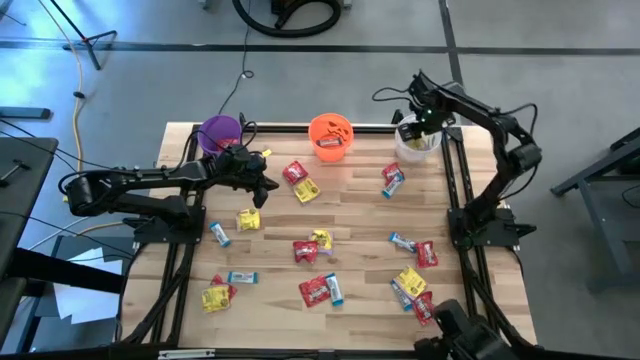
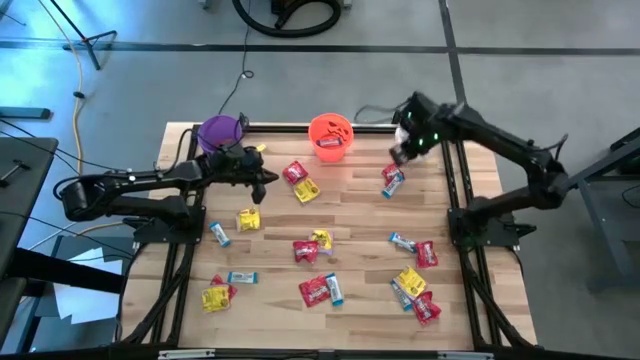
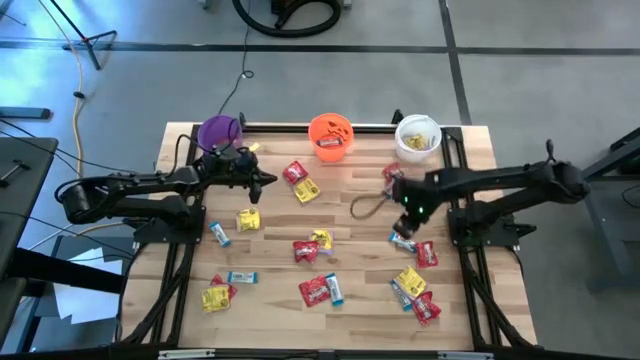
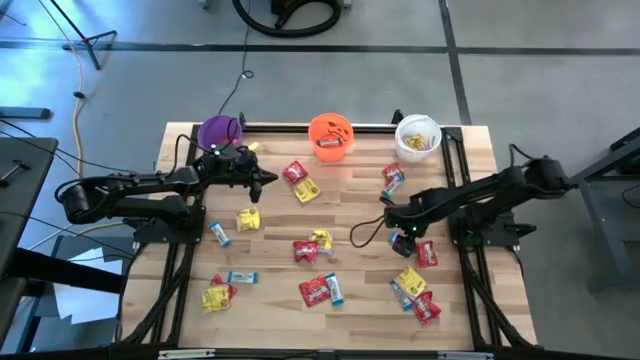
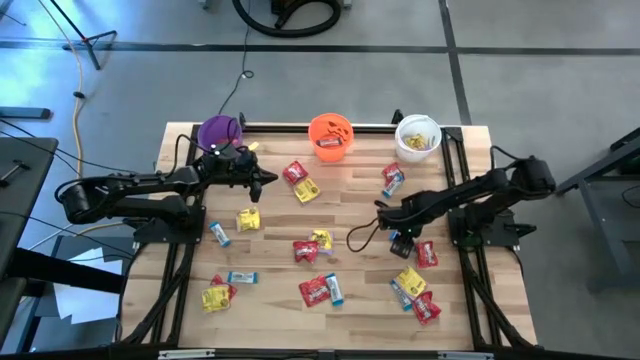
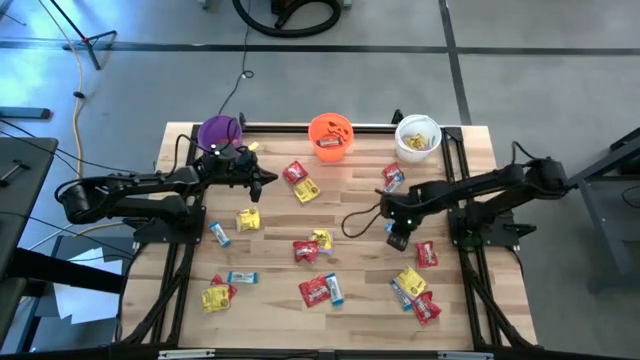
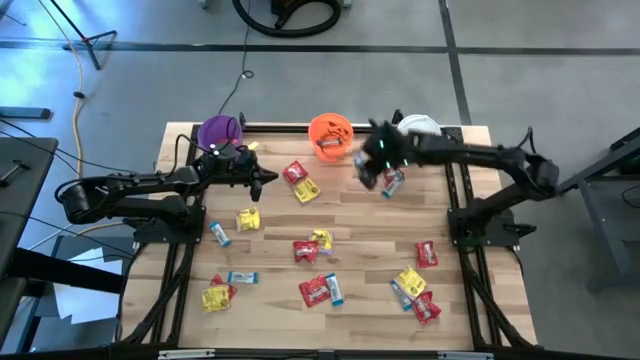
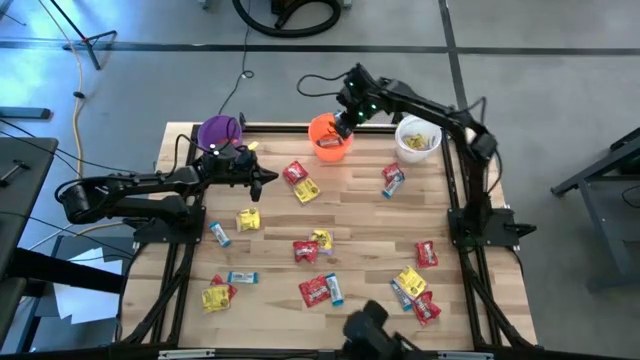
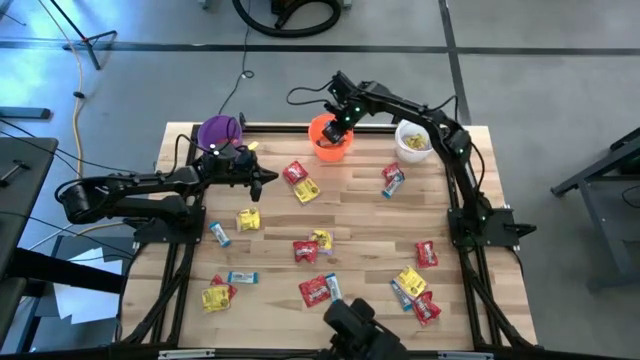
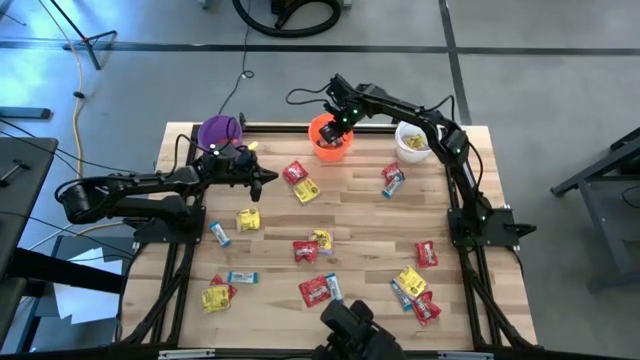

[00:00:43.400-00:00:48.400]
Task: Organize candy in baskets
Put the white chocolate into the orange bucket

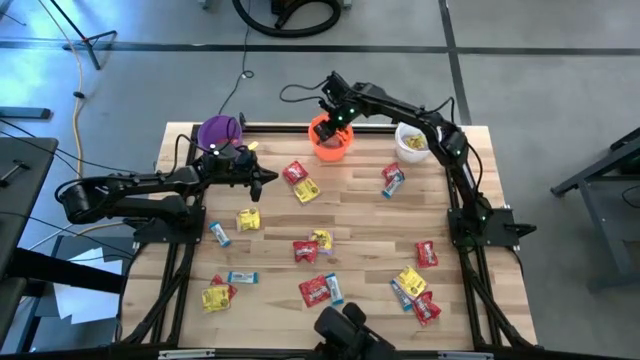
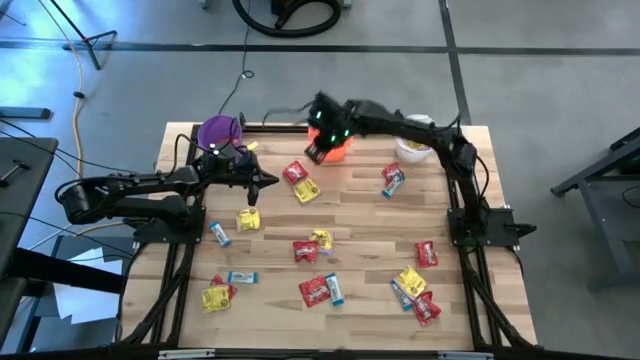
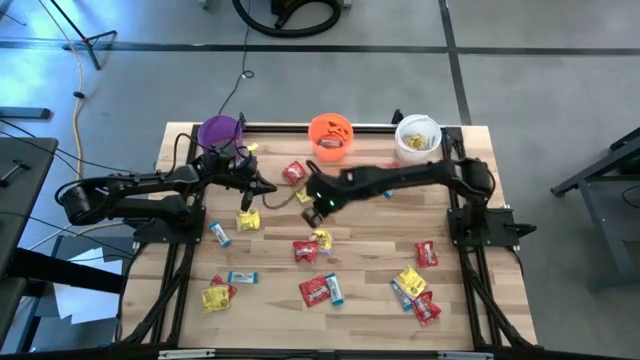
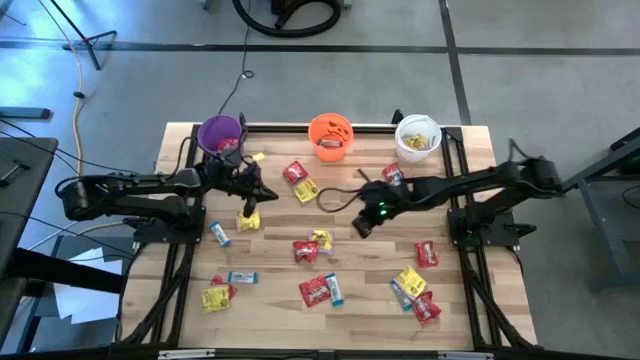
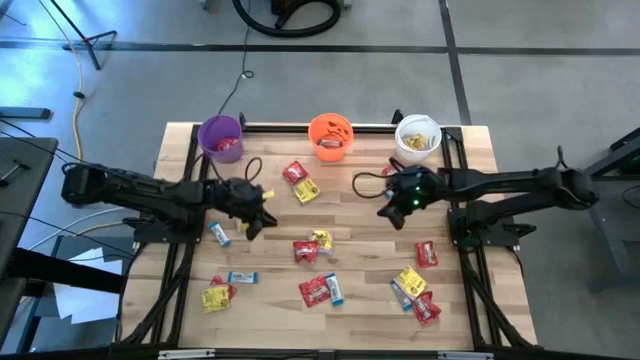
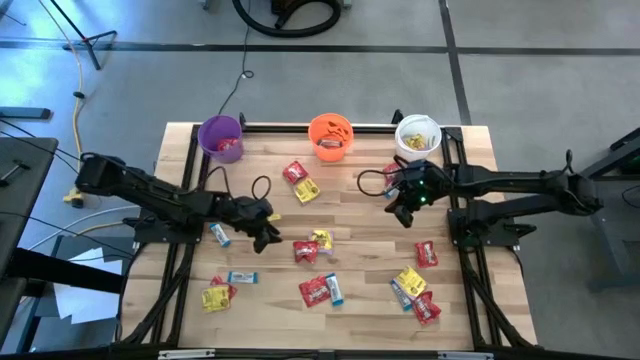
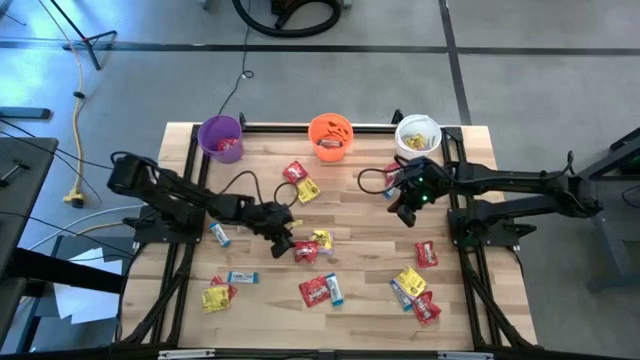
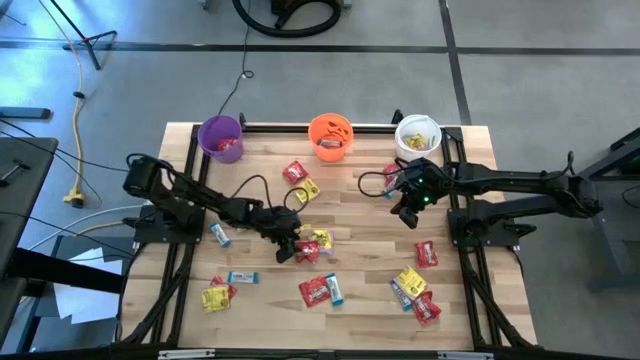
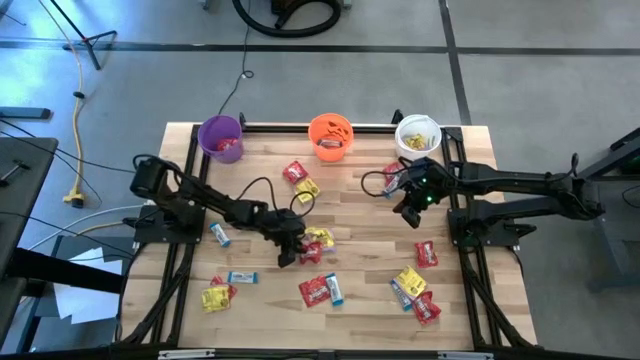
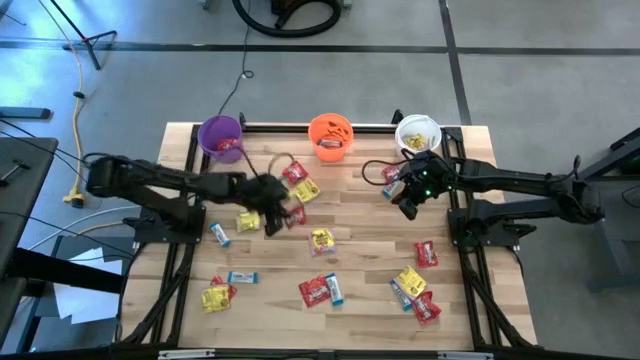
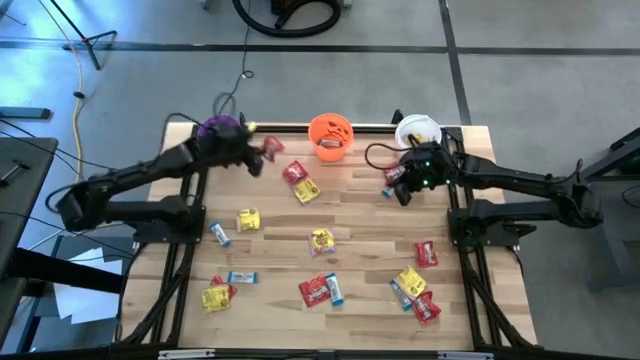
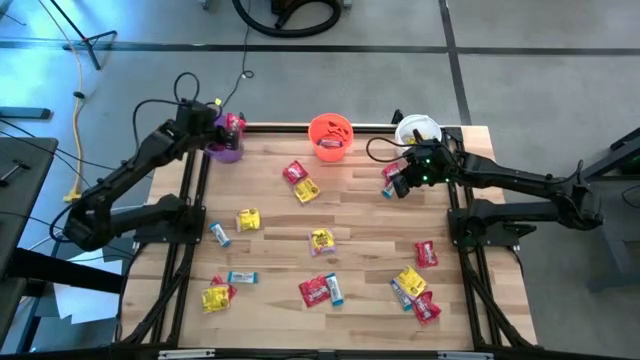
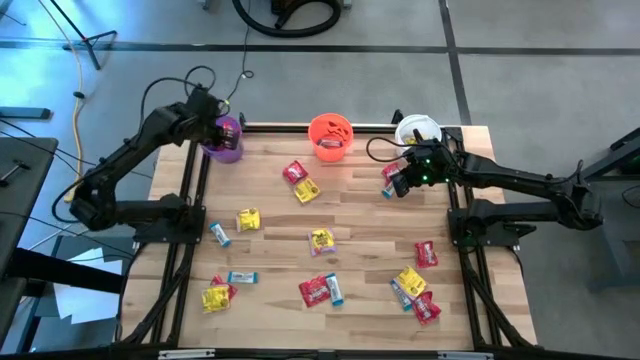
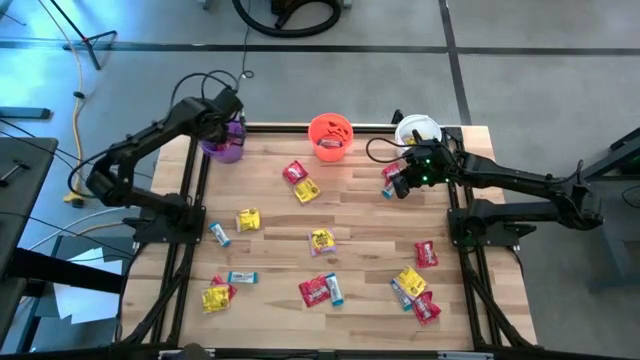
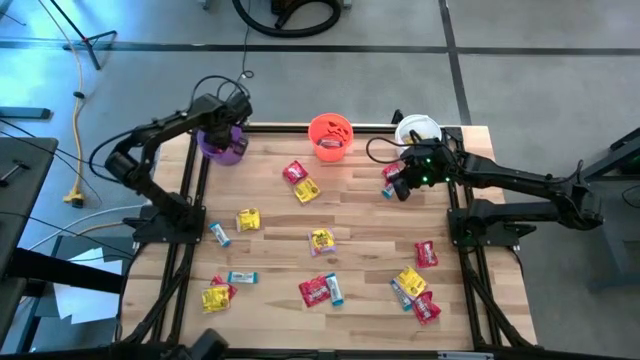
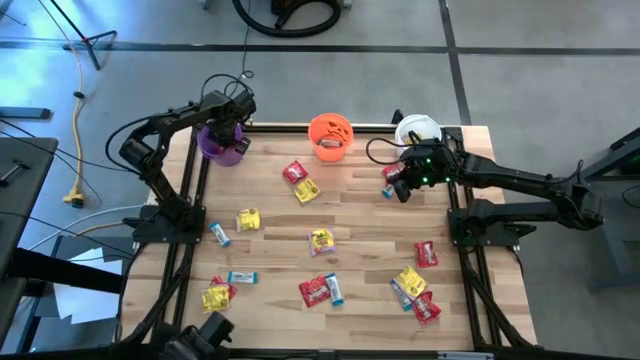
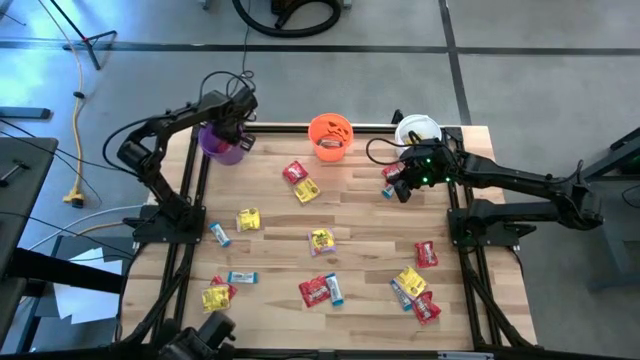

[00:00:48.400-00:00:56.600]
Put the red candy into the violet bucket

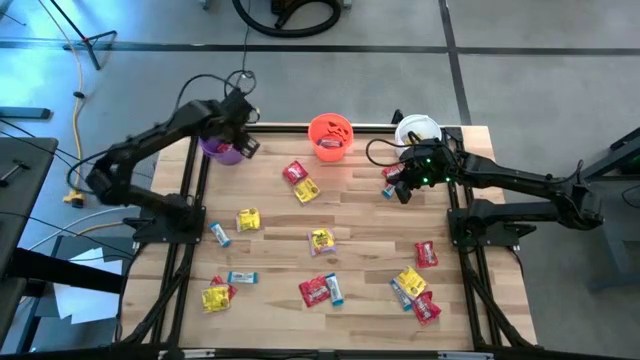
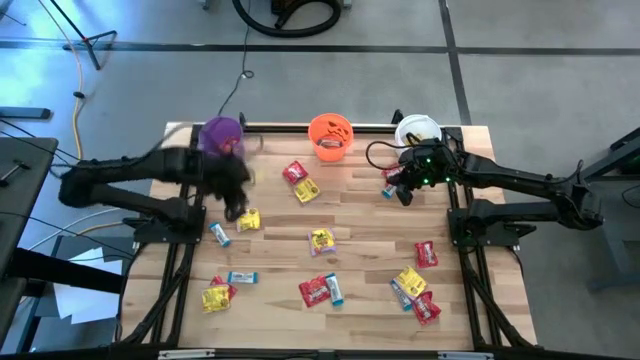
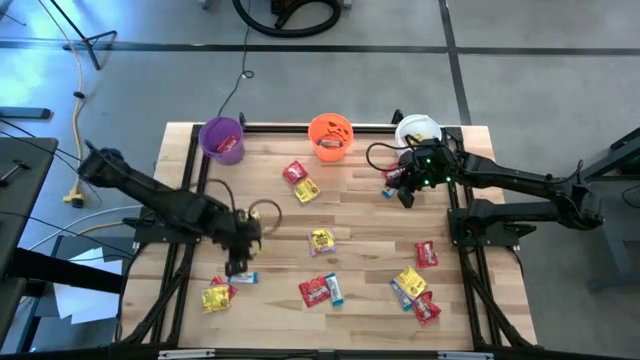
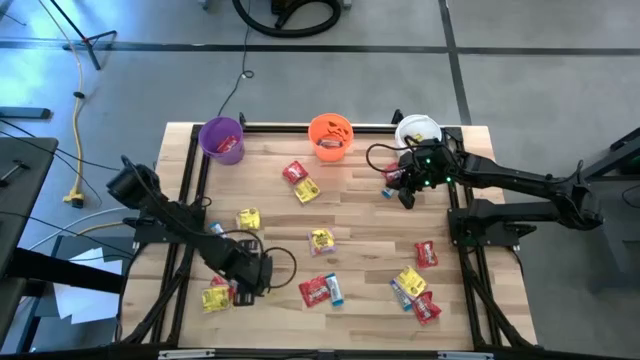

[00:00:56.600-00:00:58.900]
Put the white chocolate into the orange bucket

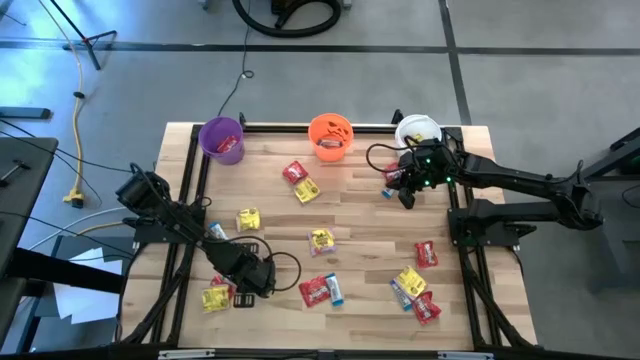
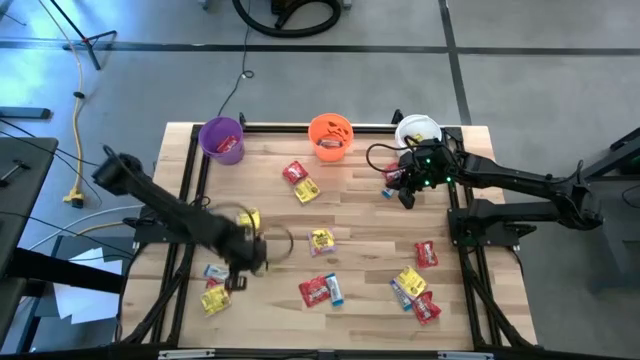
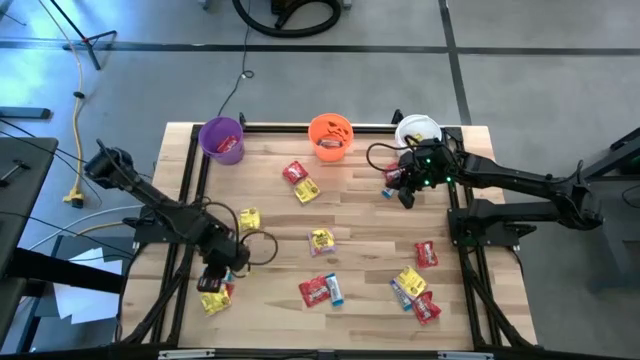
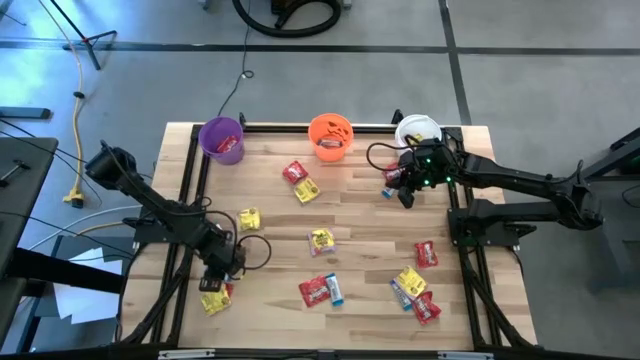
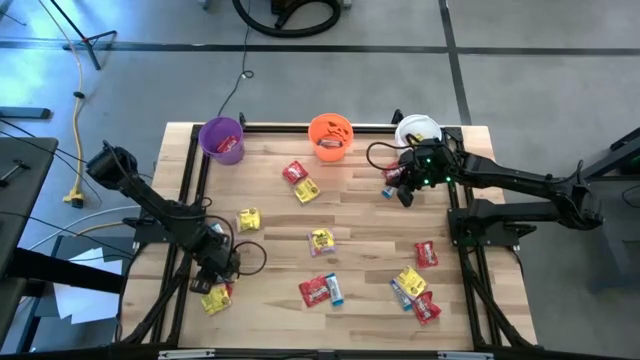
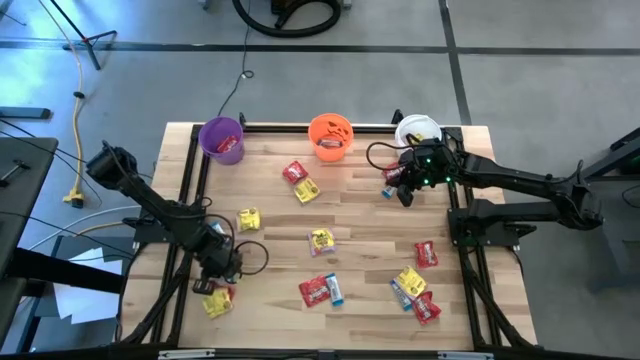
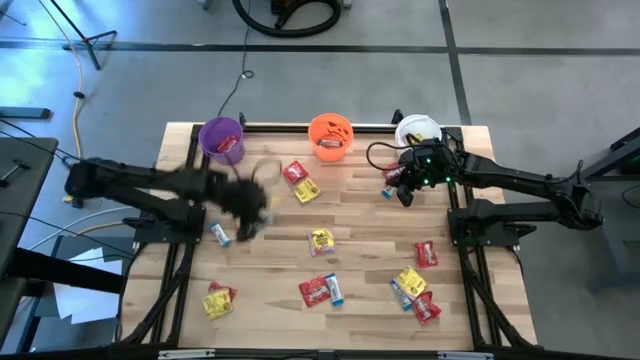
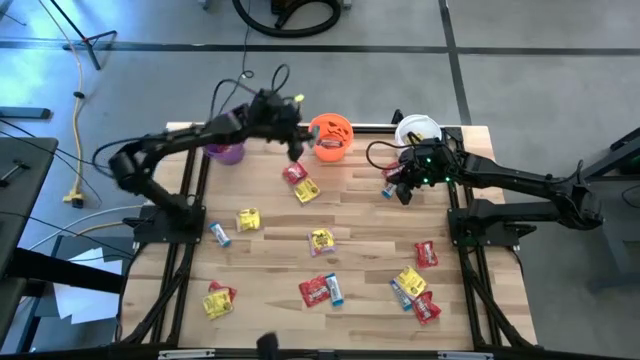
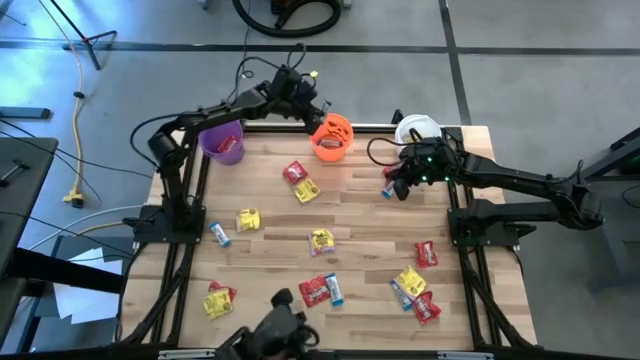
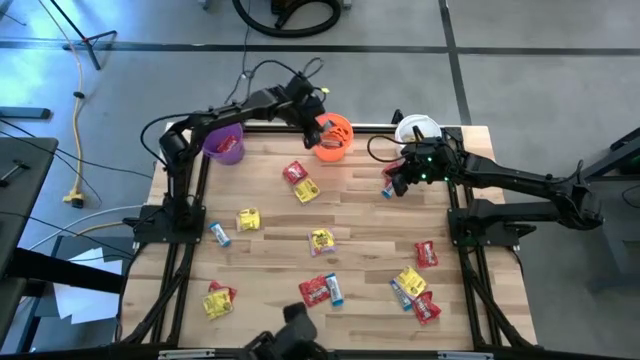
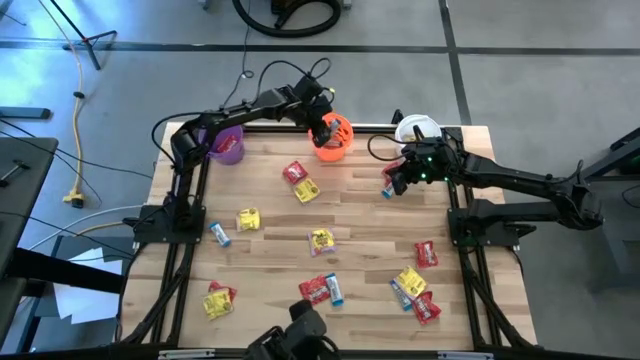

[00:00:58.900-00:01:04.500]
Put the white chocolate into the orange bucket
